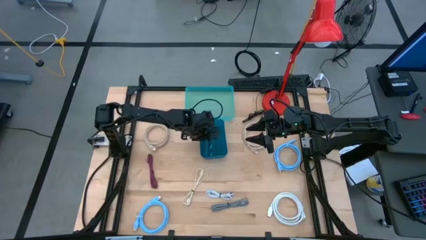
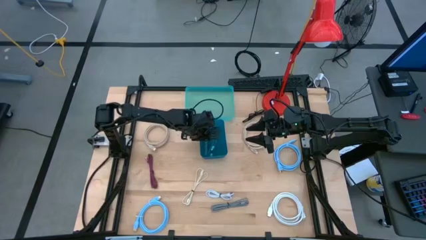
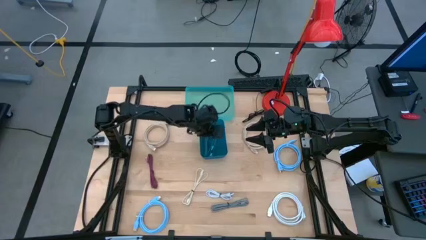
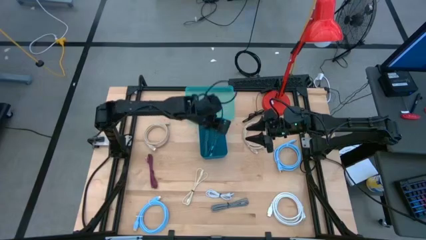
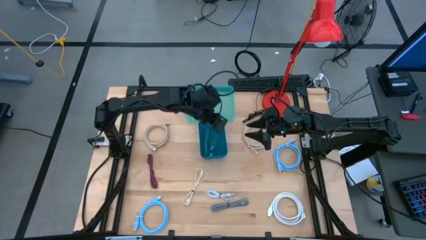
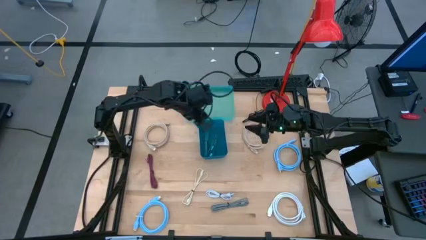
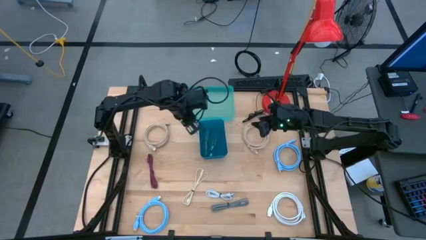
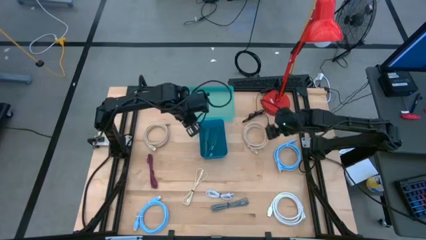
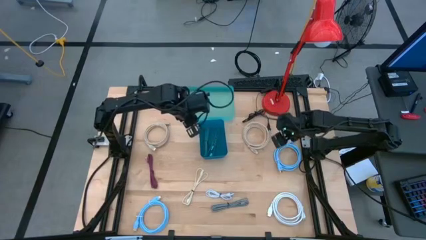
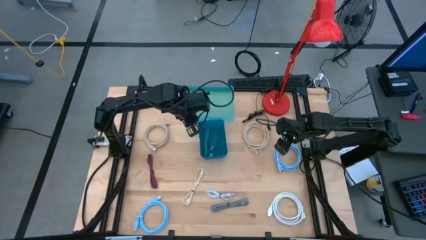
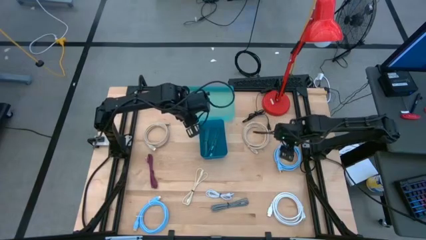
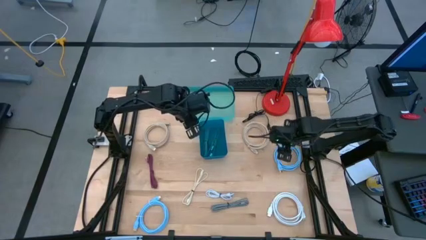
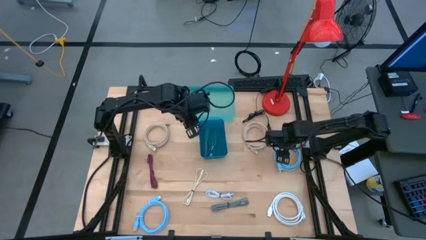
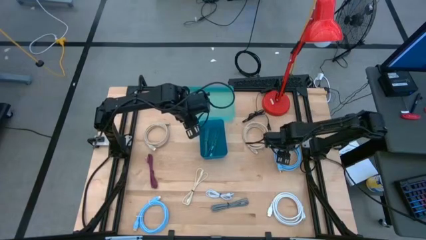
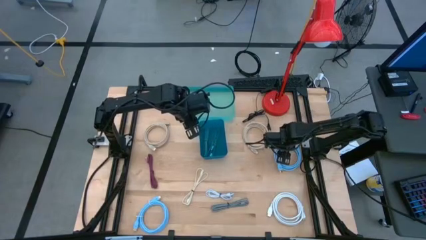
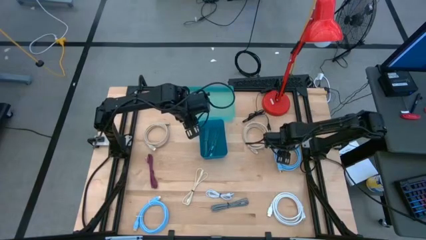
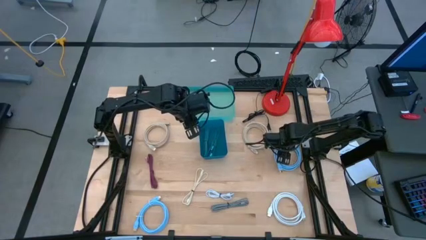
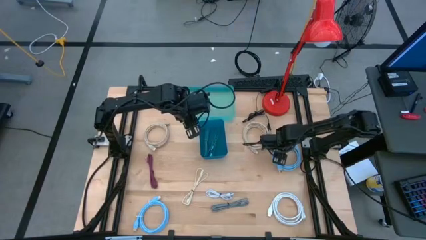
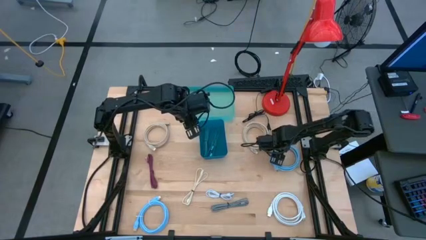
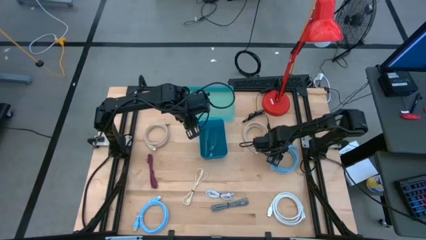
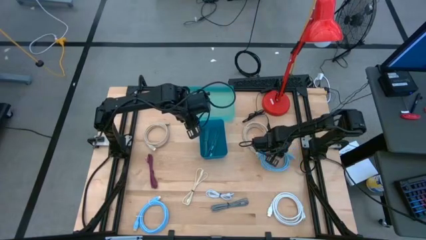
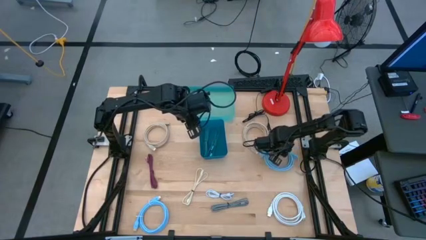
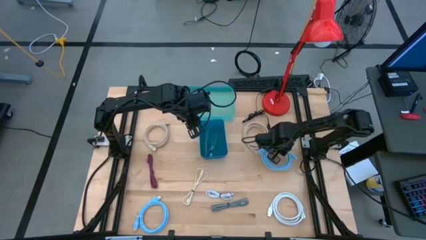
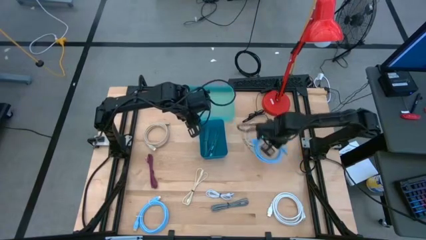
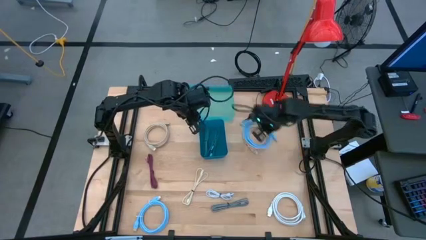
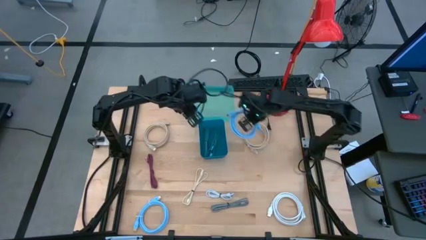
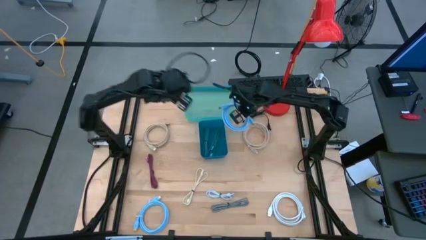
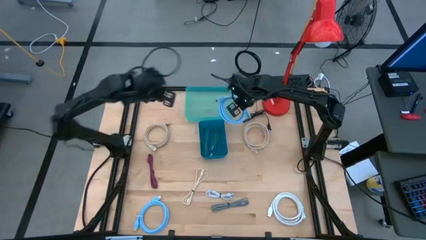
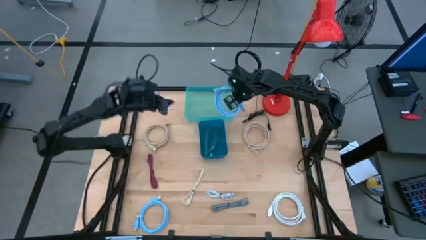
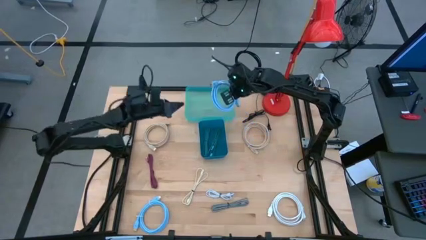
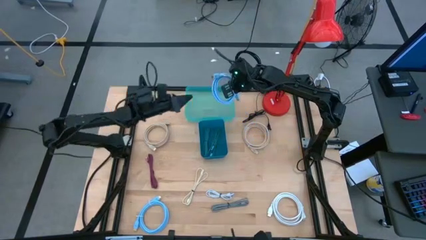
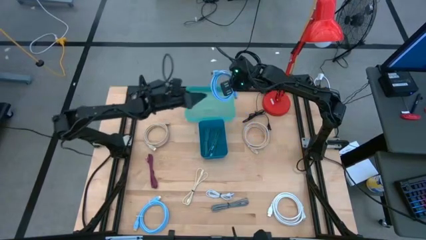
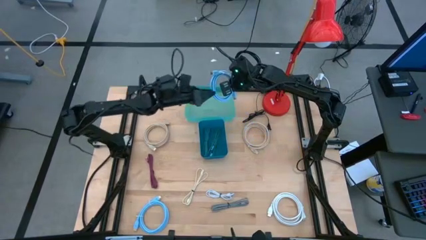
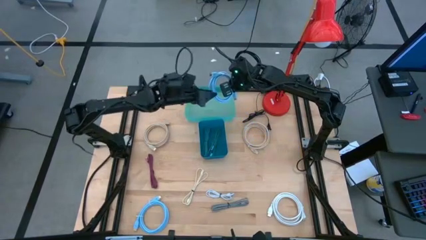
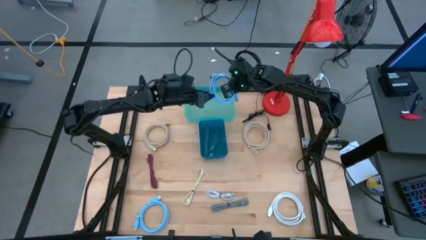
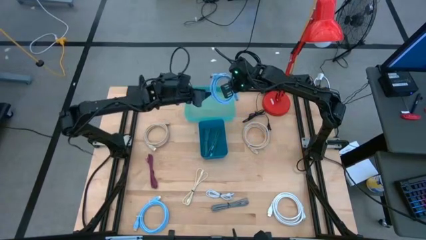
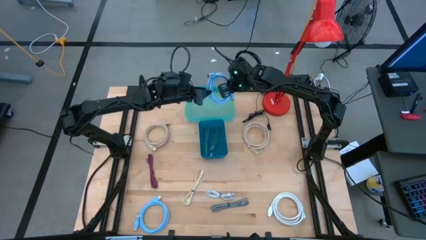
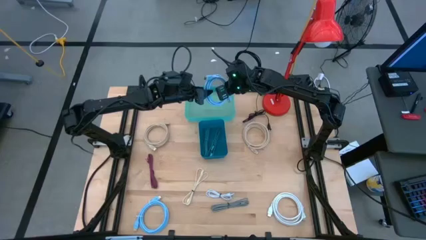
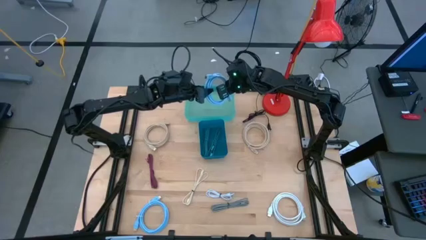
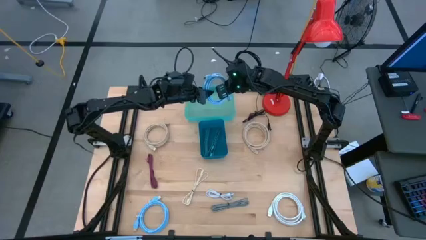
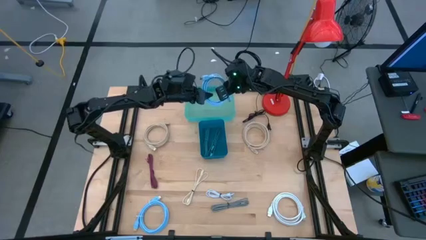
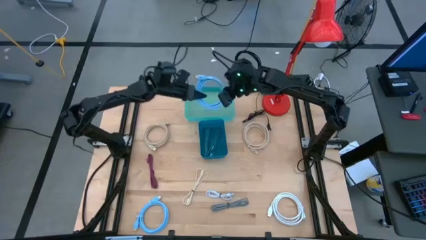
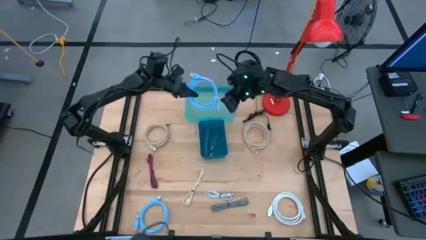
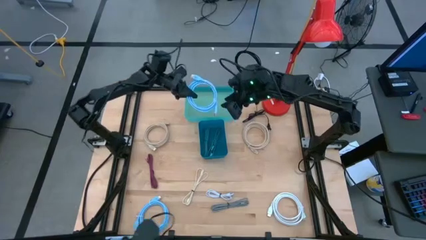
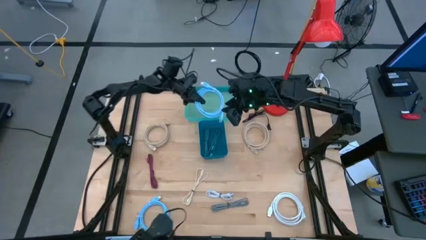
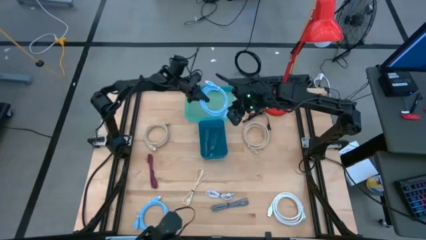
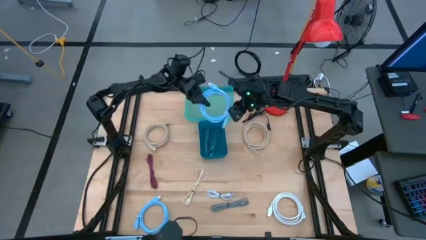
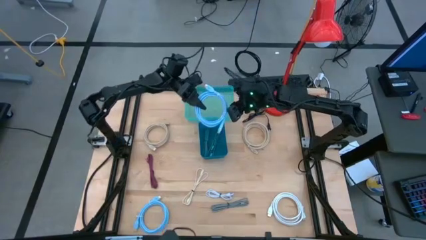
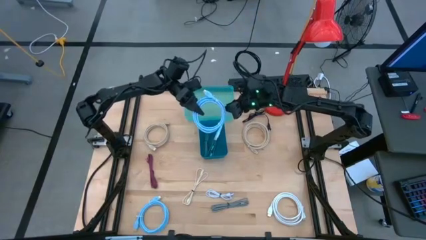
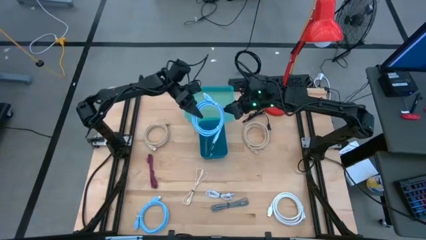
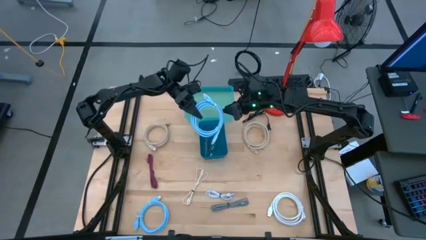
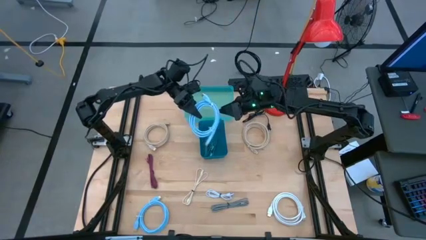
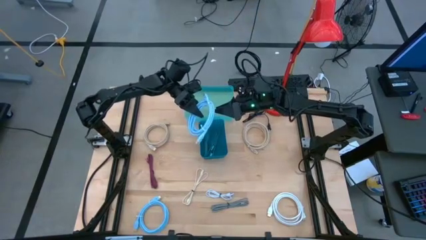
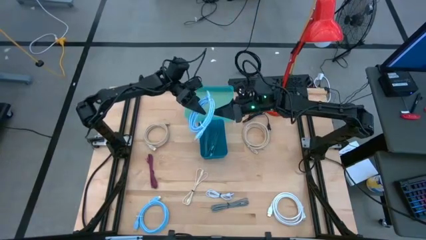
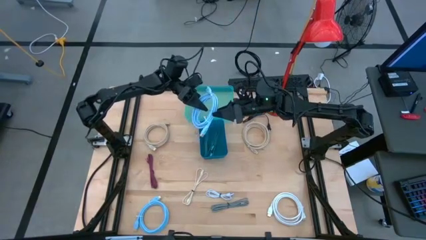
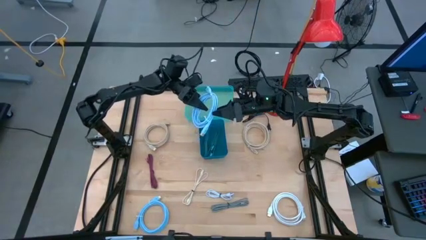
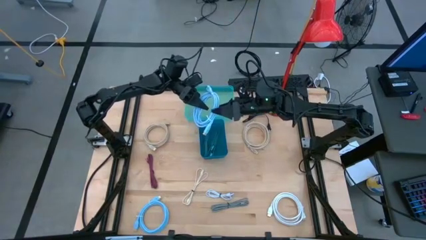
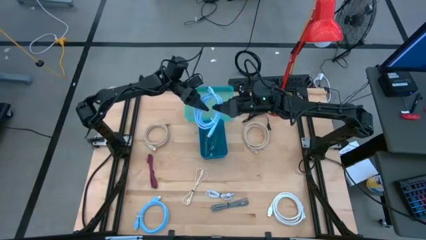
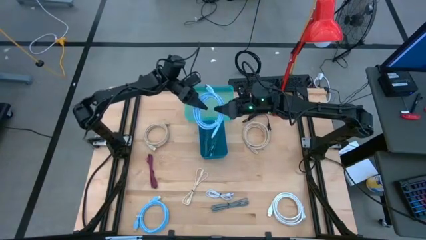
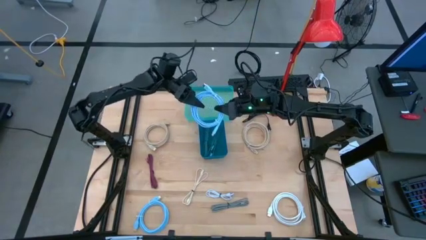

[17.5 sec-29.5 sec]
Task: Pick & Place USB Port
Put the top blue hdmi cable into the green bin
